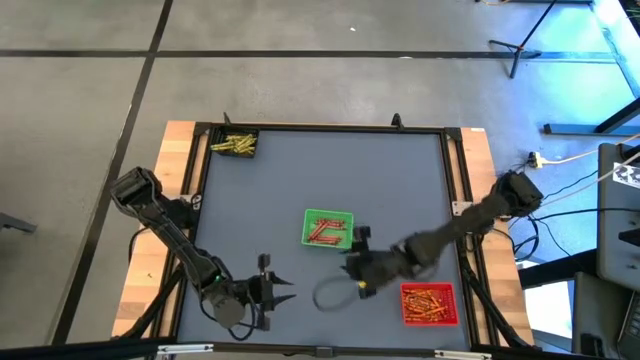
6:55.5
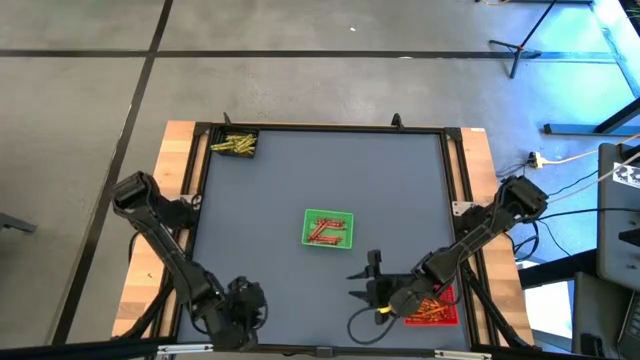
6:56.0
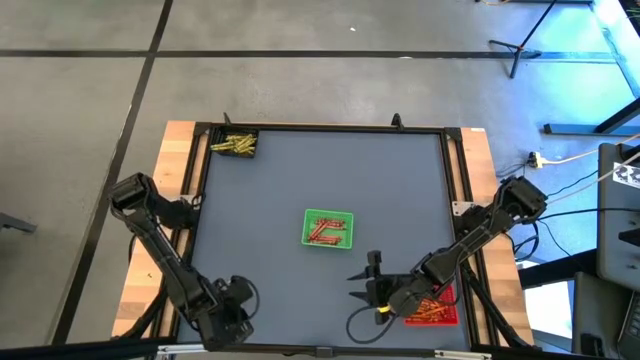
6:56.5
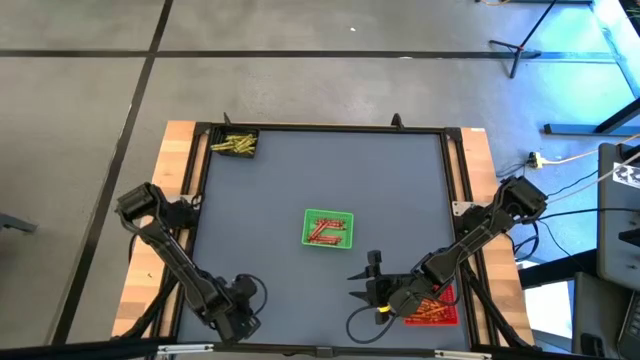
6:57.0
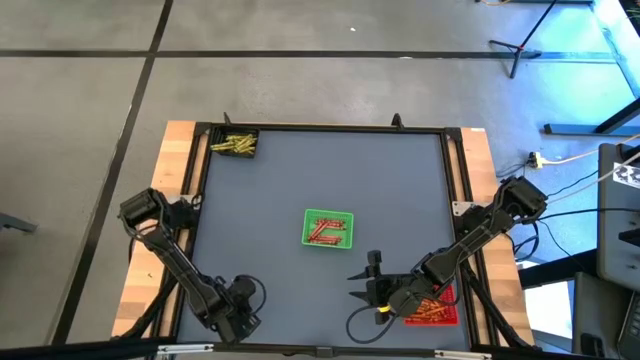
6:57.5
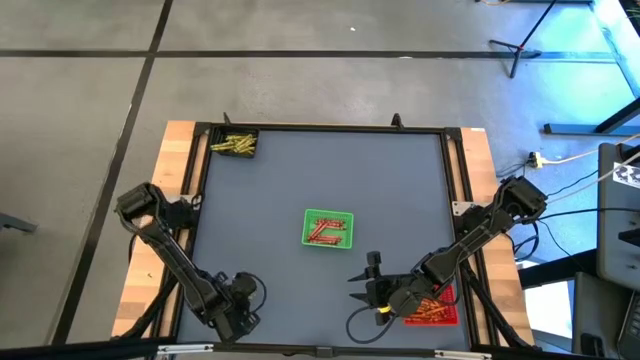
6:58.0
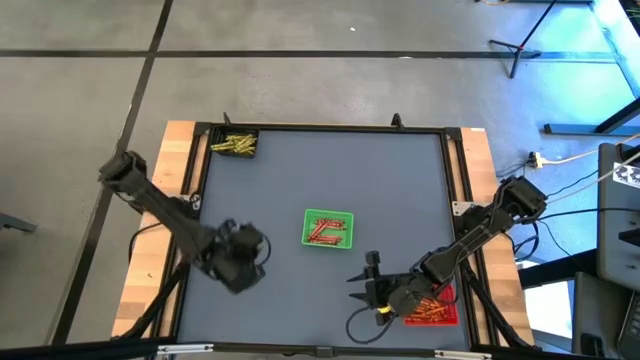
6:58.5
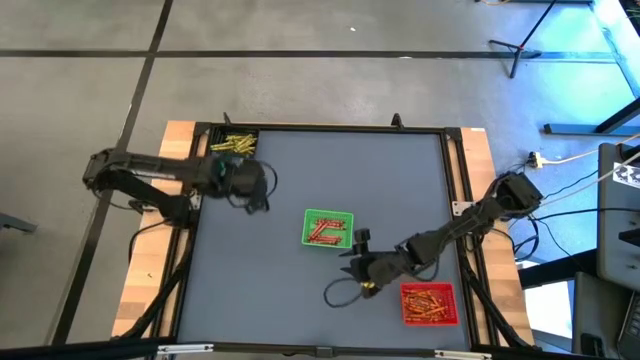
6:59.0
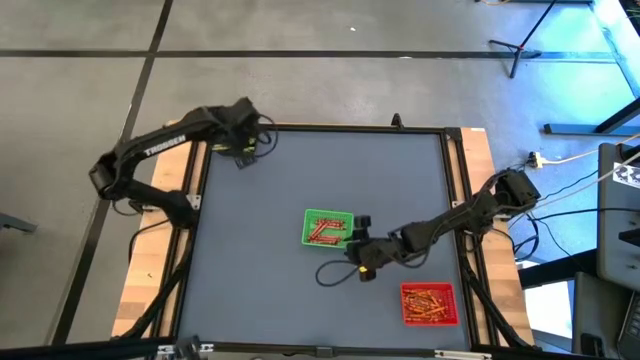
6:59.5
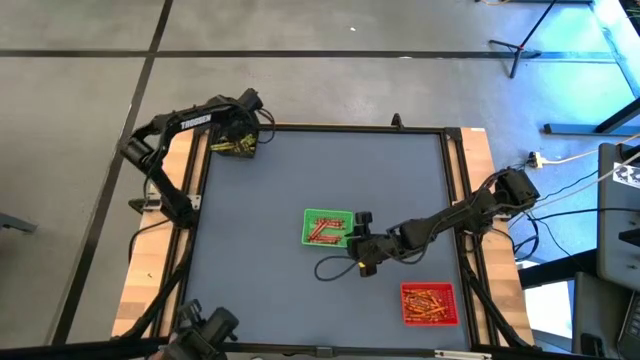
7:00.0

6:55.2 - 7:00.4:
Task: Sort crayons
Put the green crayon into the black bin

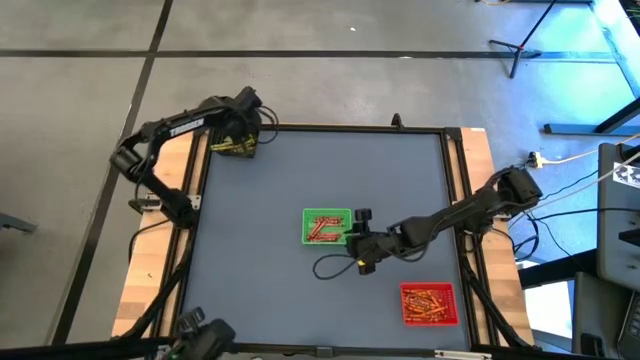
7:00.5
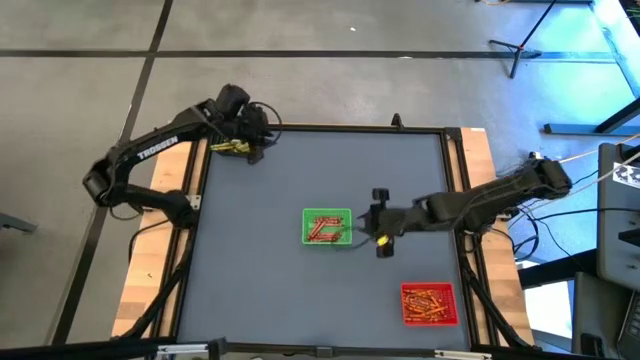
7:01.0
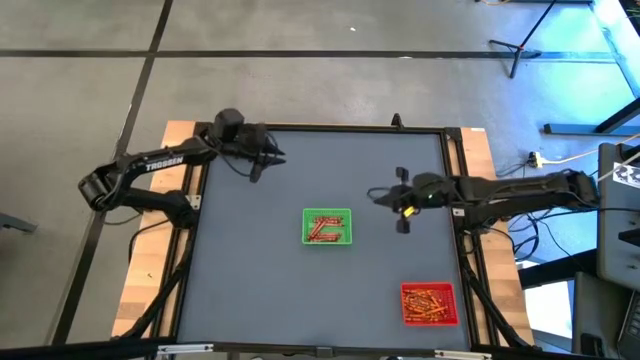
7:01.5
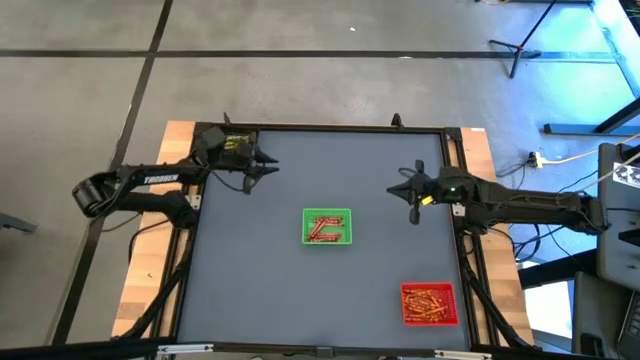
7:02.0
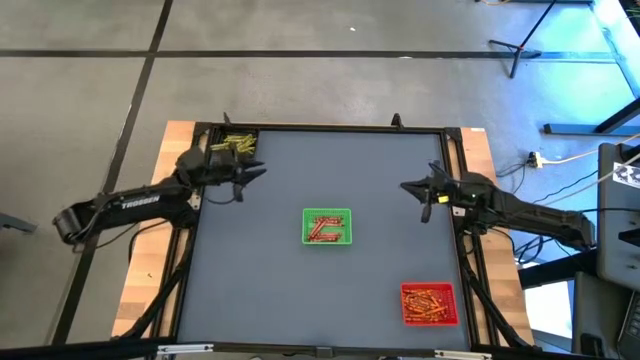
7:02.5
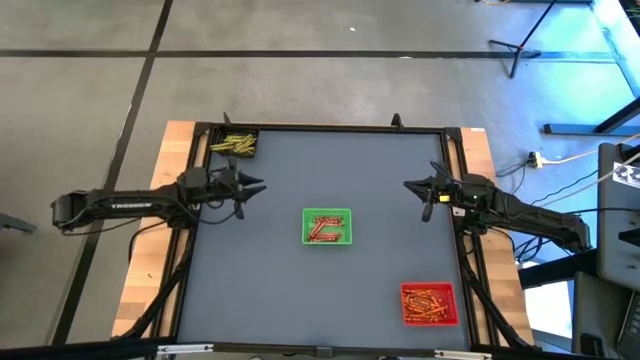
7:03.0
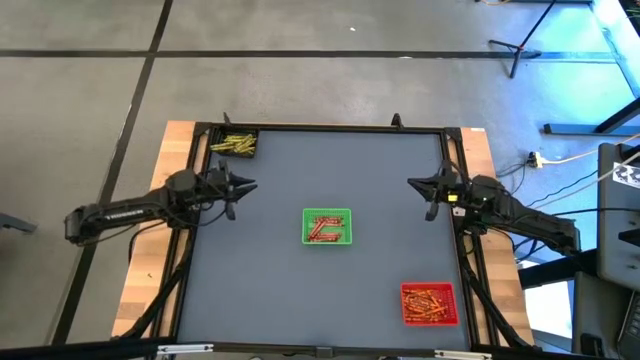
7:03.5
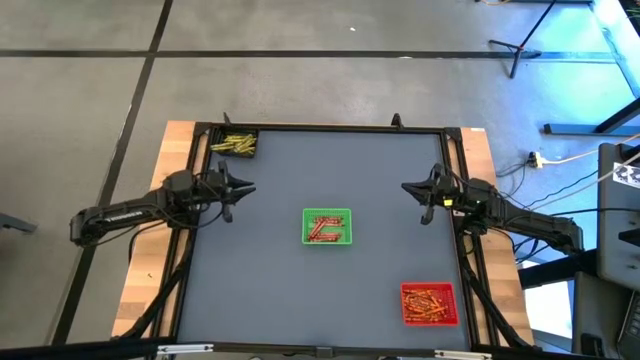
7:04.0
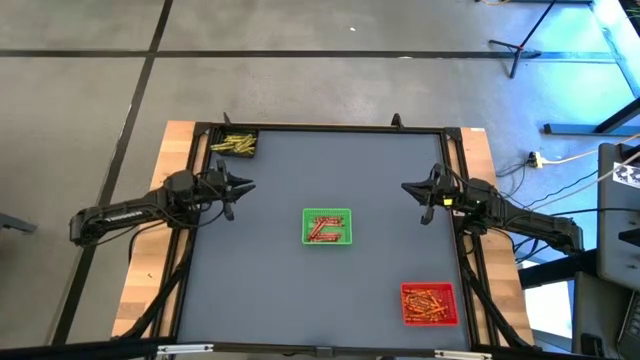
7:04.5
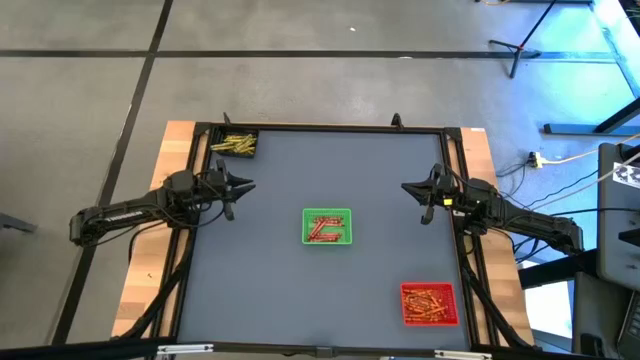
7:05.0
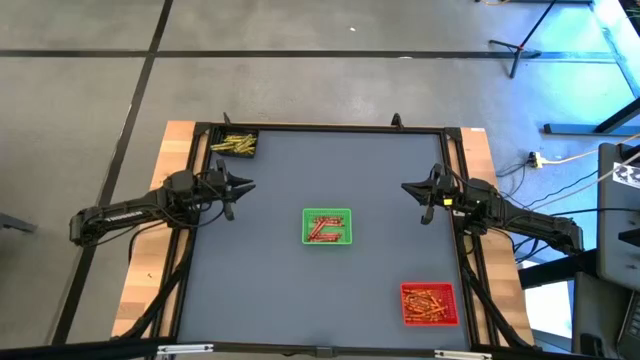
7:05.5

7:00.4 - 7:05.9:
Return to Home Position

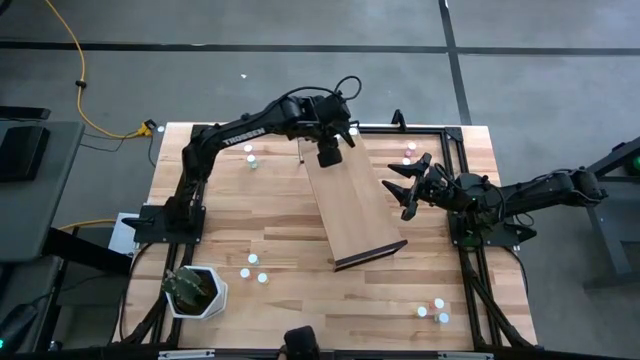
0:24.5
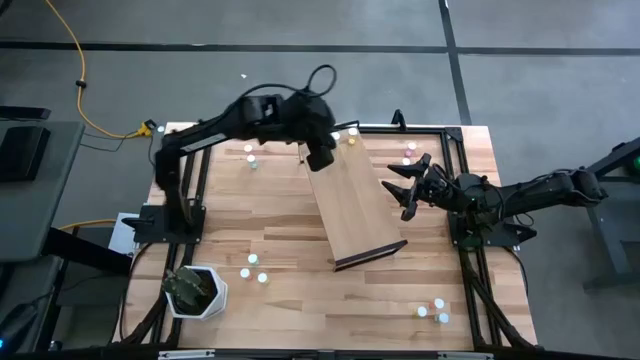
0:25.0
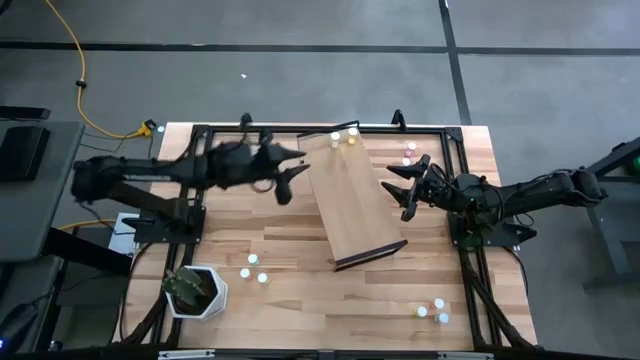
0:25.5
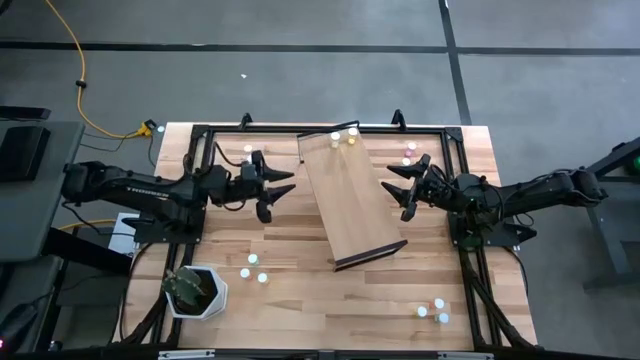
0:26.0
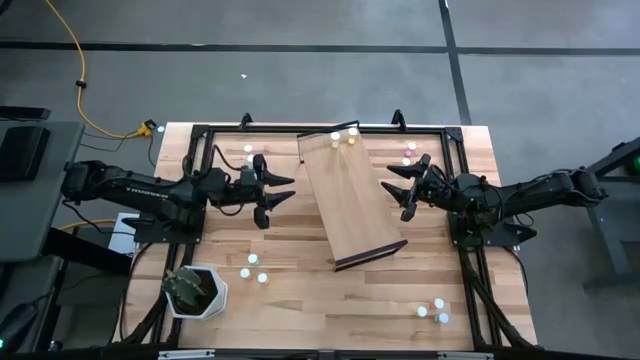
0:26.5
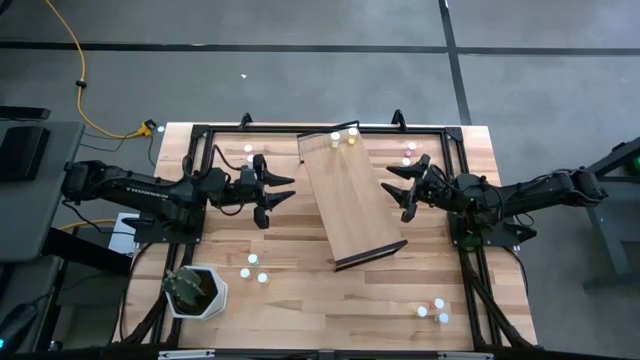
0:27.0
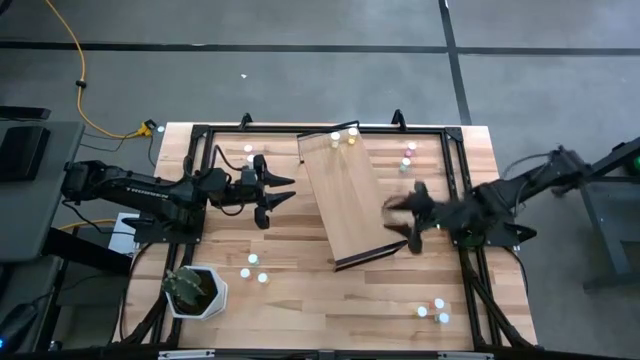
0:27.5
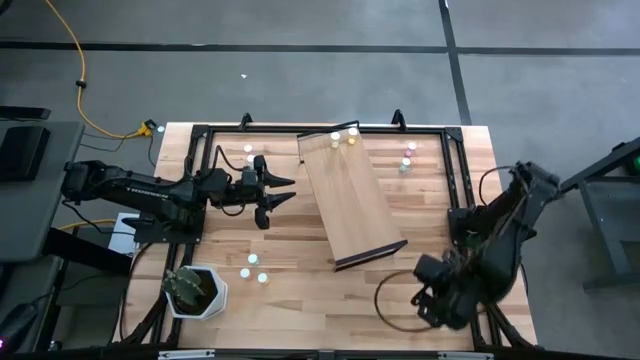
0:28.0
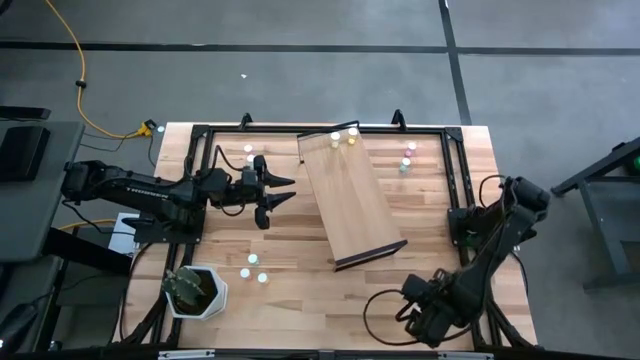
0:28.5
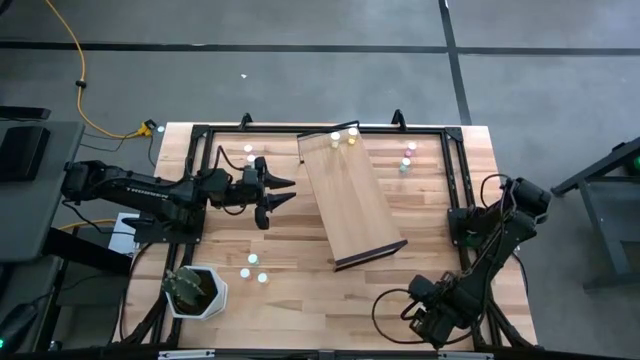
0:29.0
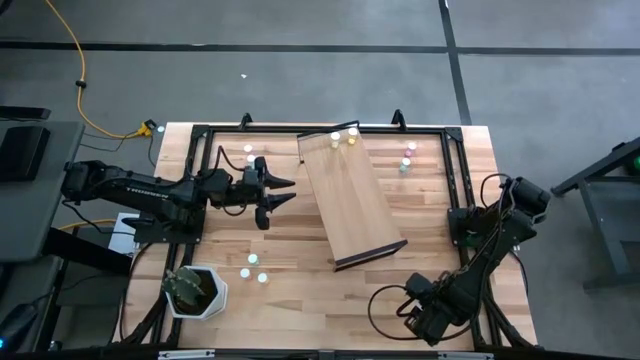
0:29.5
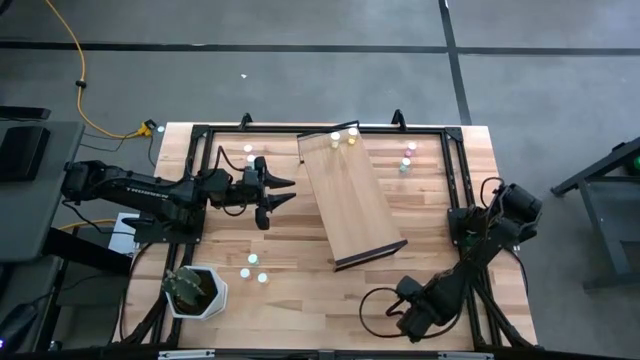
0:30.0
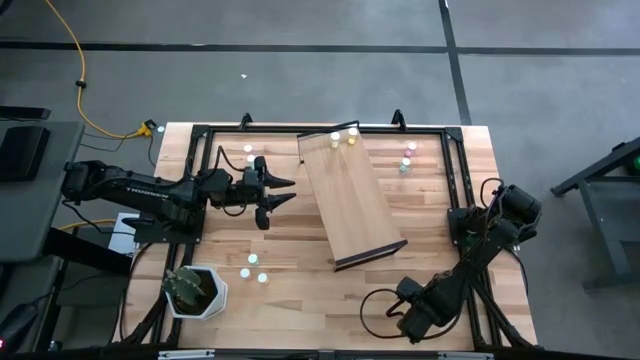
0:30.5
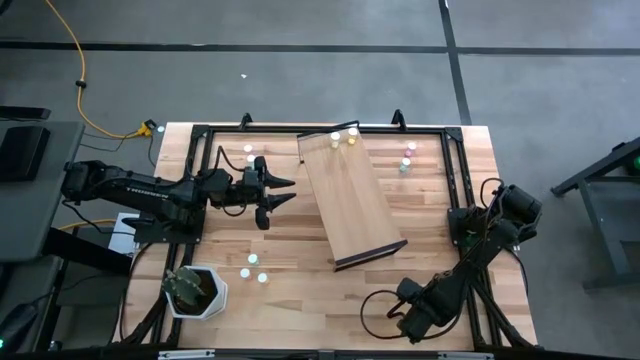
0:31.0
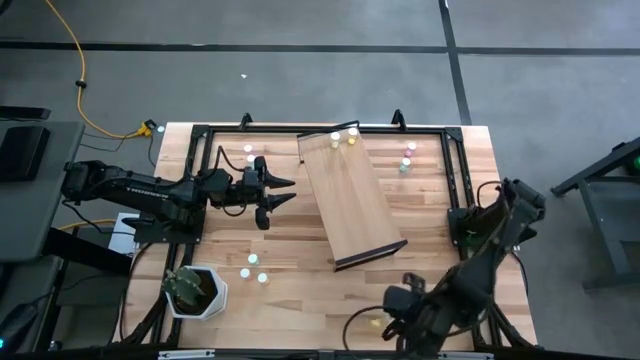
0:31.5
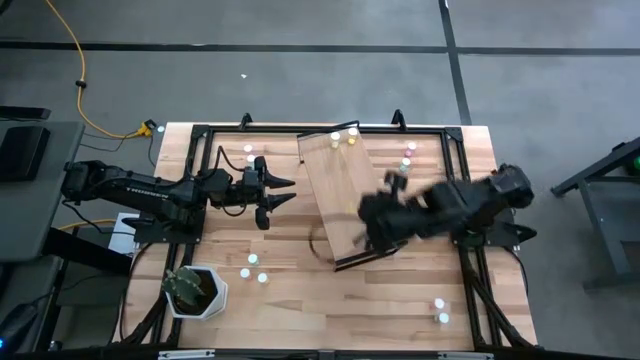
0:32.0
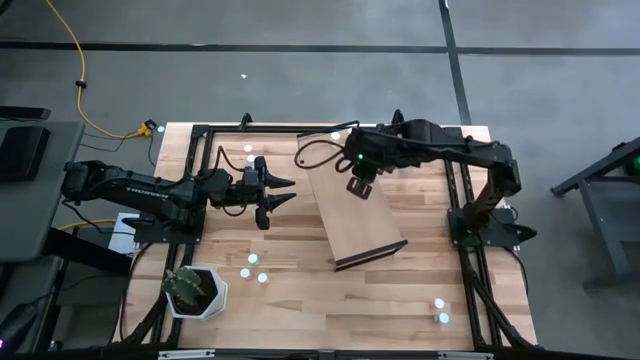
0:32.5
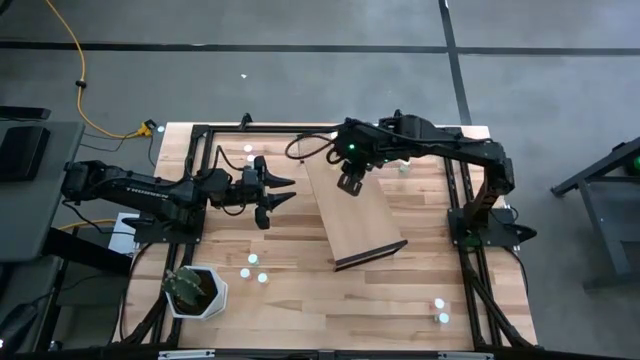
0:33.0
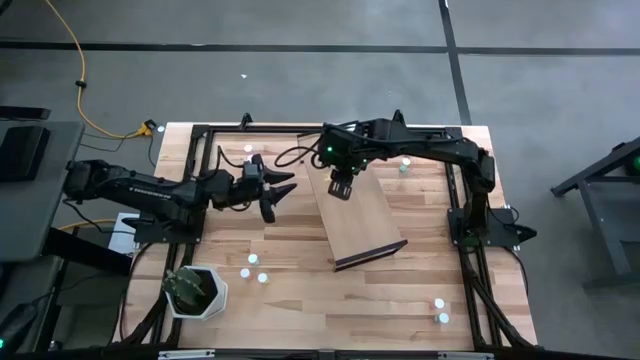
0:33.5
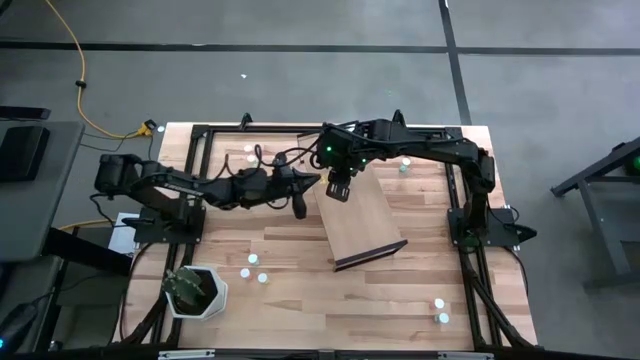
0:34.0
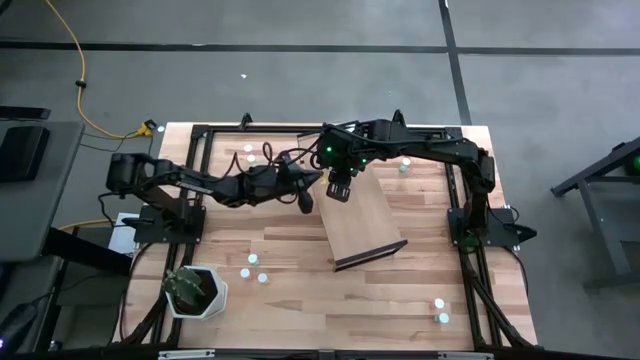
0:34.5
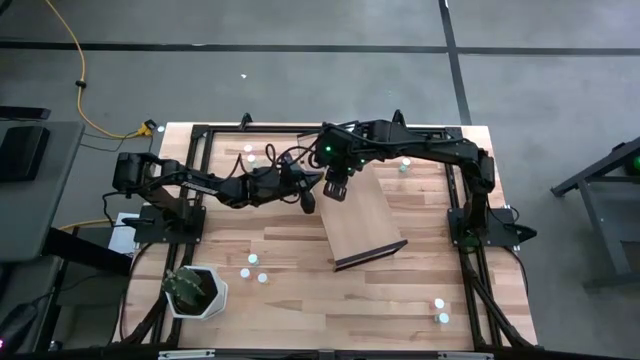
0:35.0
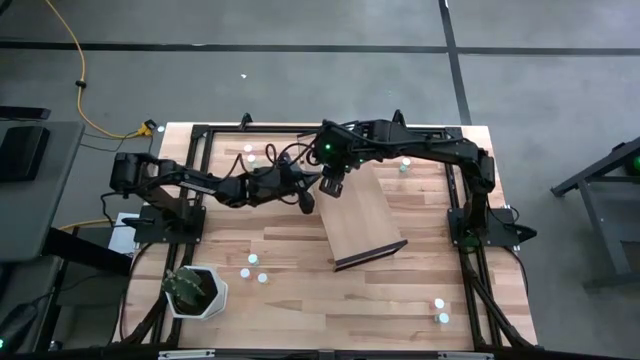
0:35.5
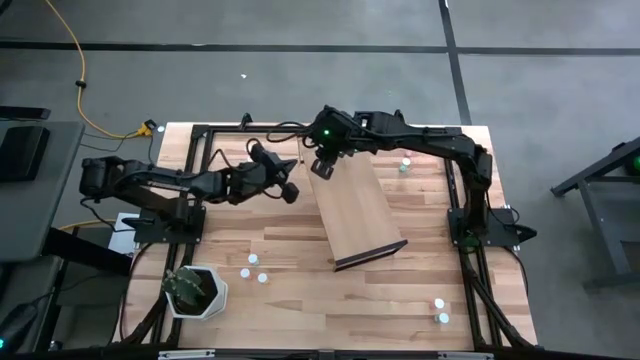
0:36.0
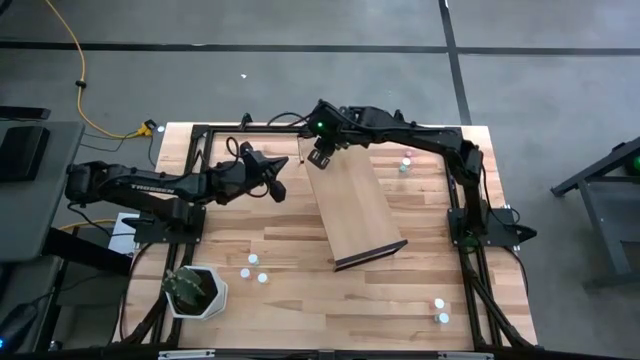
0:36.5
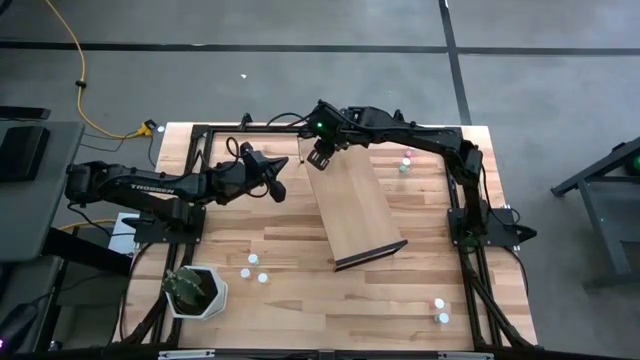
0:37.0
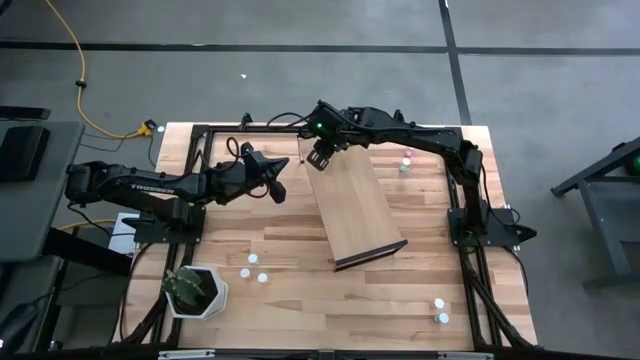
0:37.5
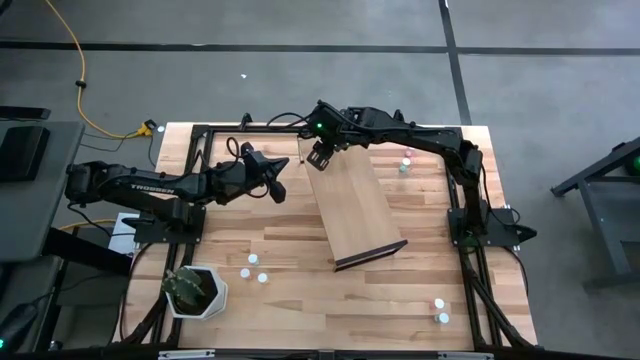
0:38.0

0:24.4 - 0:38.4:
Task: Pick and place medicine bottles onto shelf by color
Put the yellow pill bottle on the shelf aligned with the other yellow pill bottles
